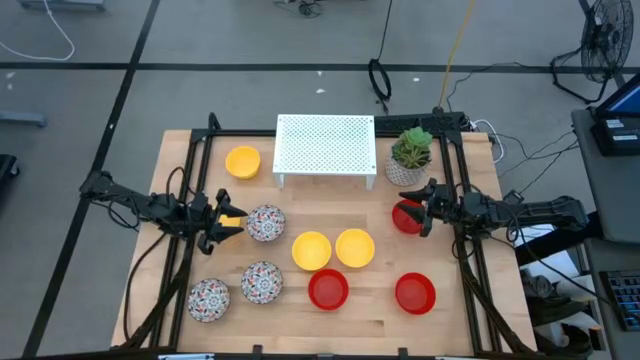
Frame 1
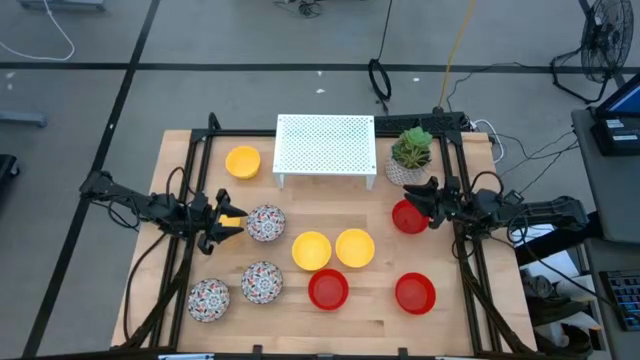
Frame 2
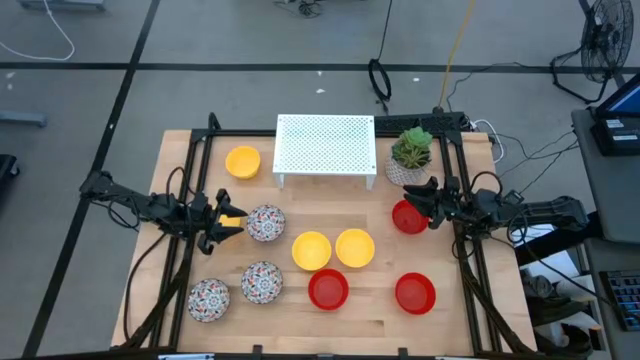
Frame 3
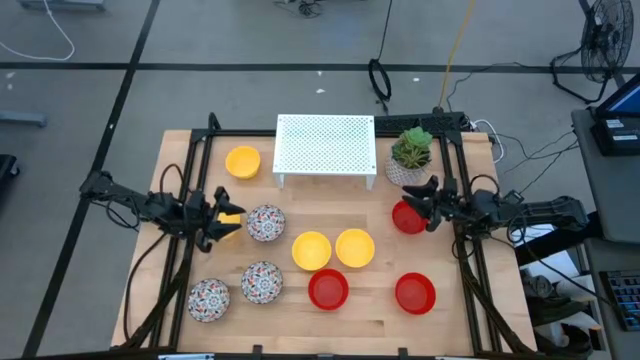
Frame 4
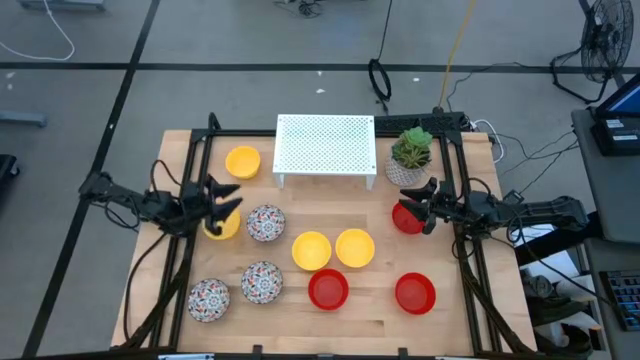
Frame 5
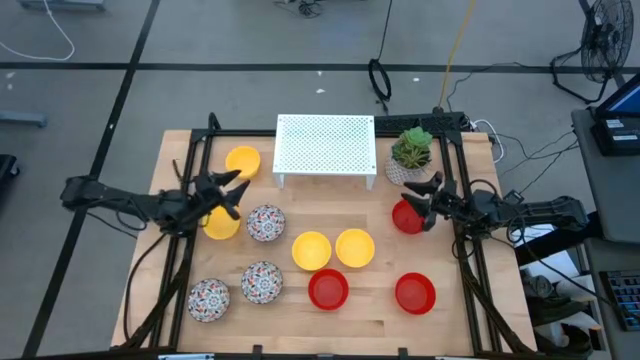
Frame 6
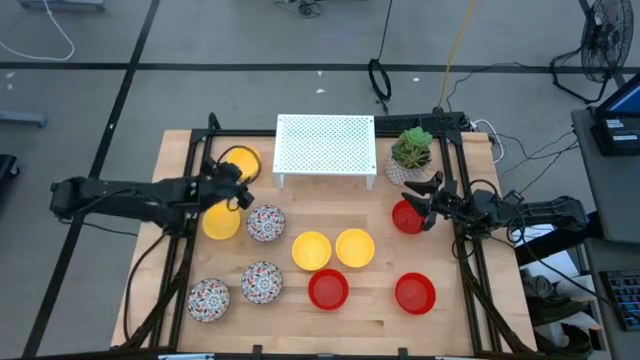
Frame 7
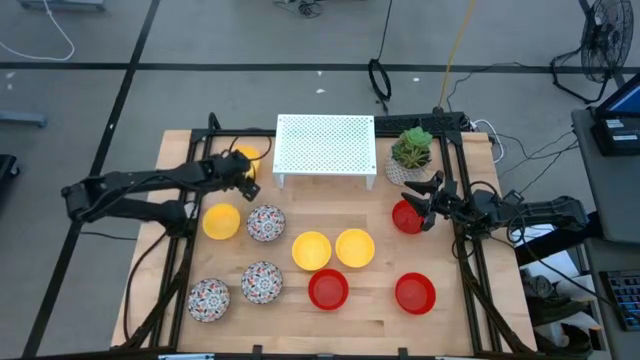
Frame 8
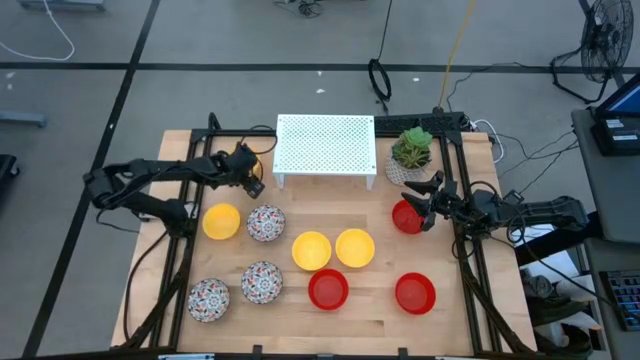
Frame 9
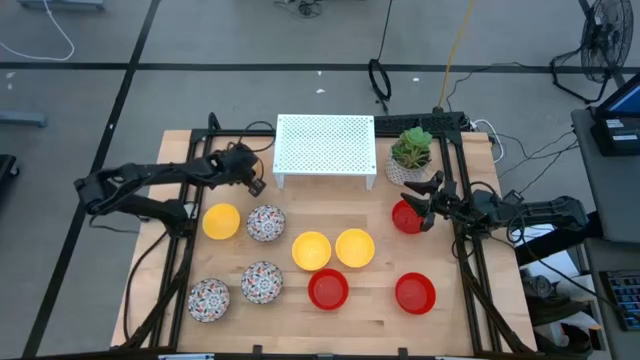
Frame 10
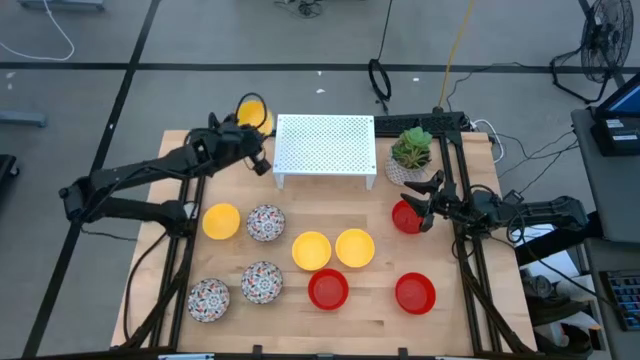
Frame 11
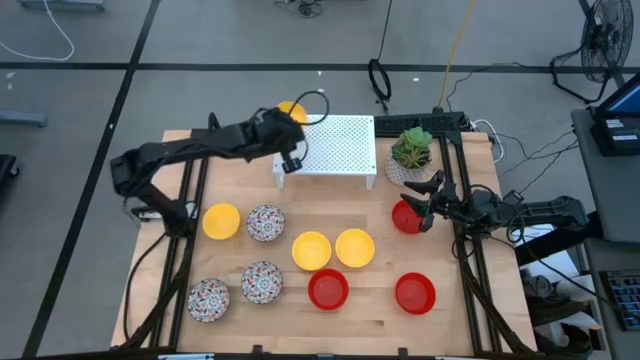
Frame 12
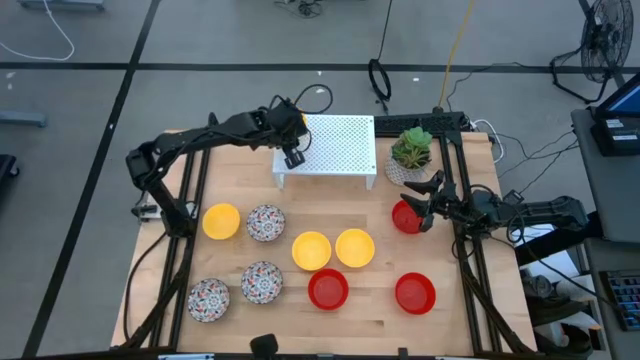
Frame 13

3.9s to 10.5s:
Task: Pick & Place Mini bowls
Put the yellow bowl on the shelf

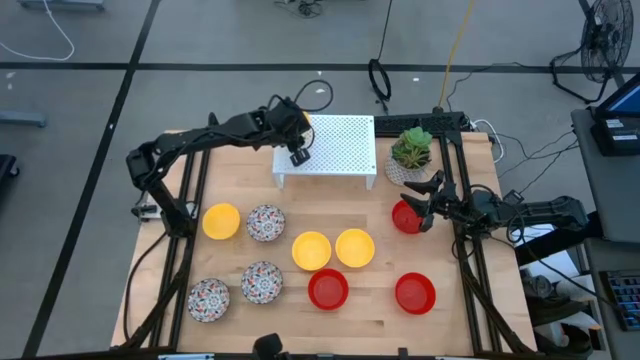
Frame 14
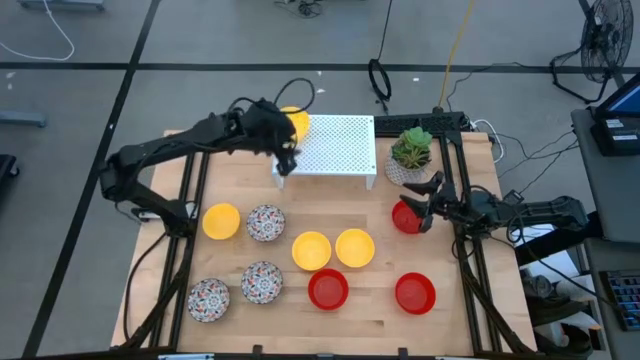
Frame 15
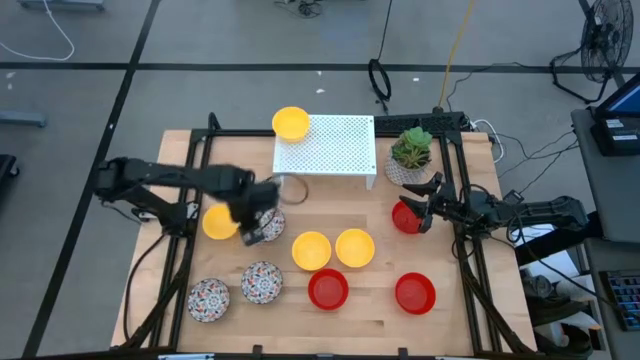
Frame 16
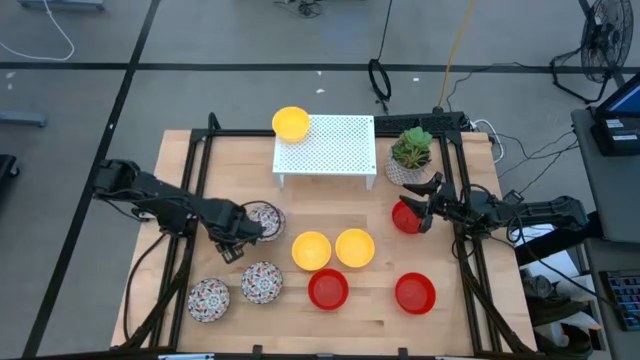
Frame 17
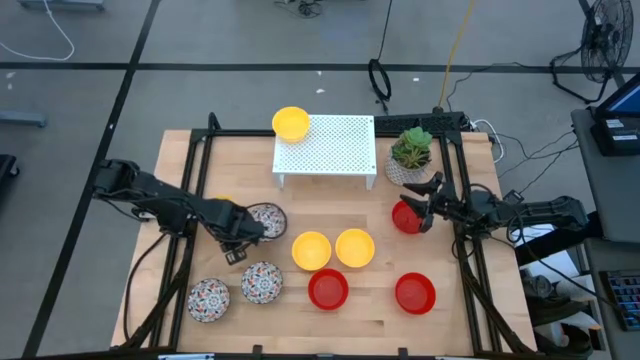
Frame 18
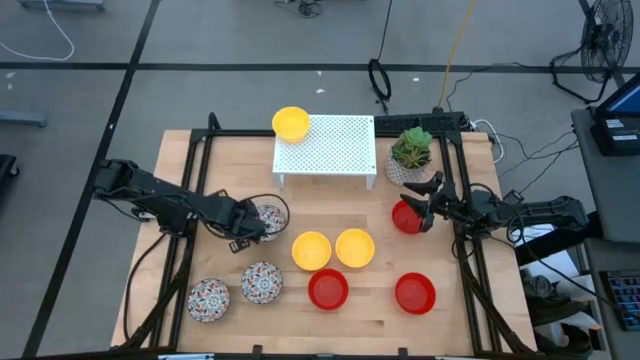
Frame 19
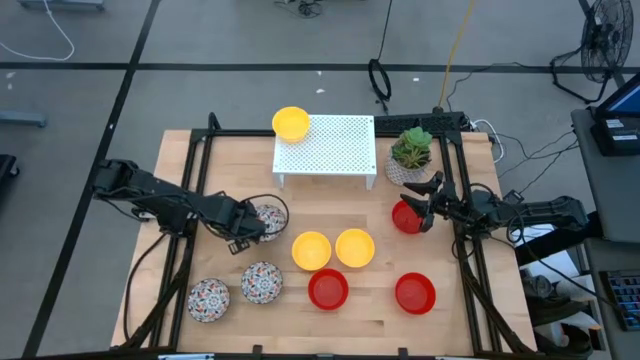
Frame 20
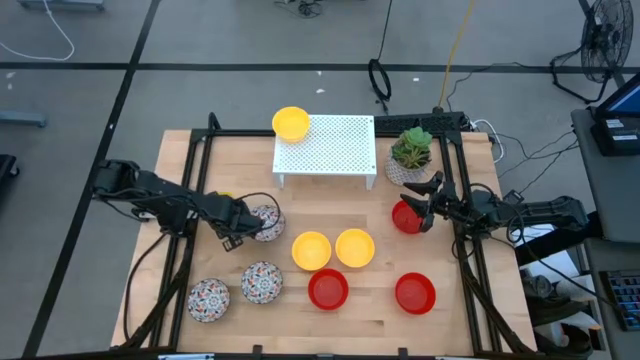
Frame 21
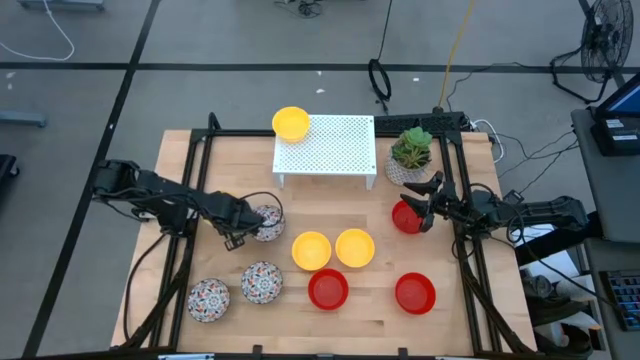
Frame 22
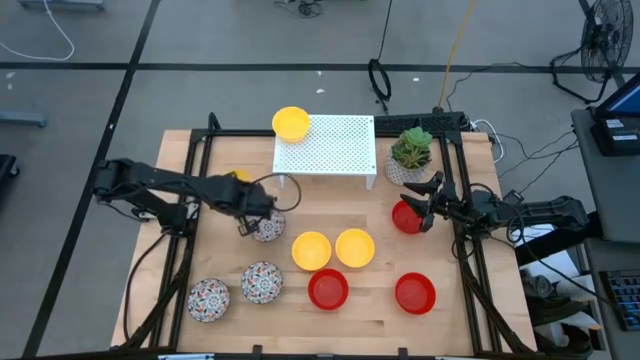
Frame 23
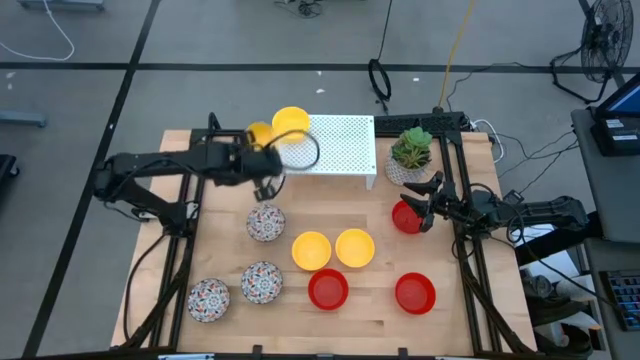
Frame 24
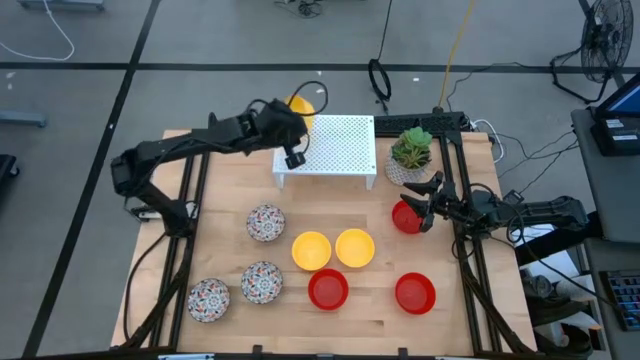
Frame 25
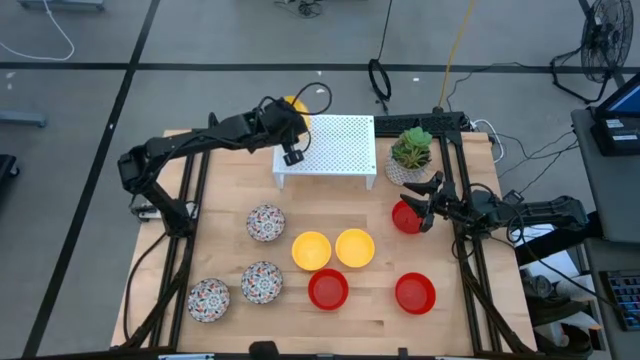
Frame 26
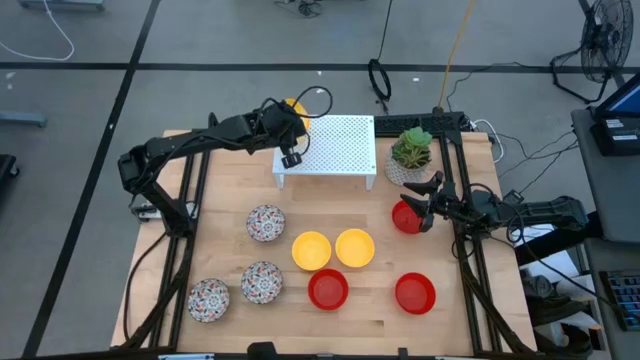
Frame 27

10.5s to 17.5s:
Stack the yellow bowl on the yellow bowl on the shelf

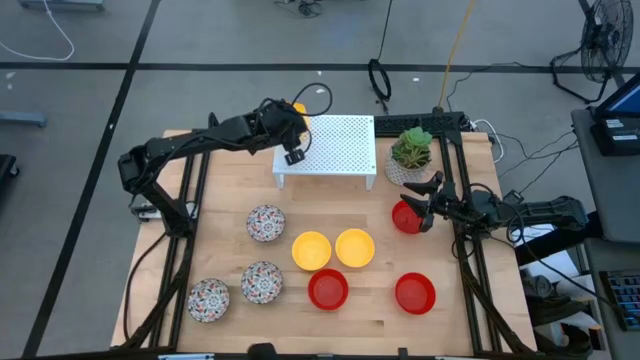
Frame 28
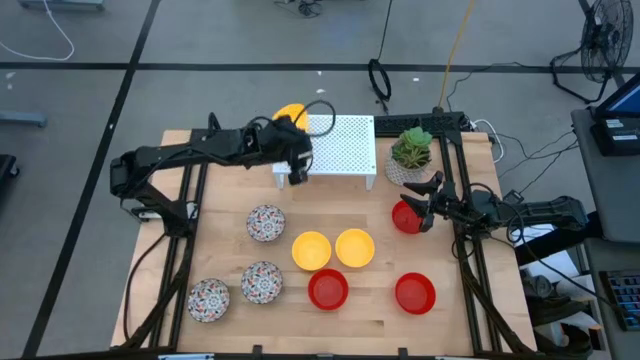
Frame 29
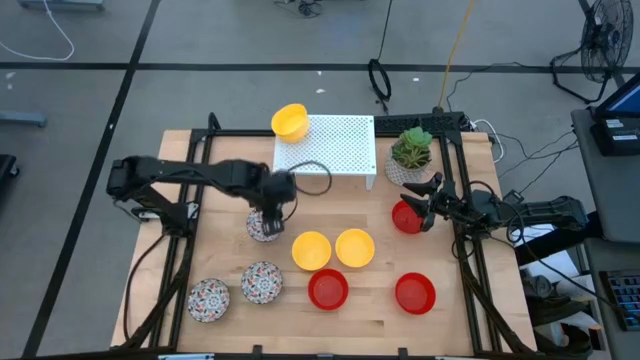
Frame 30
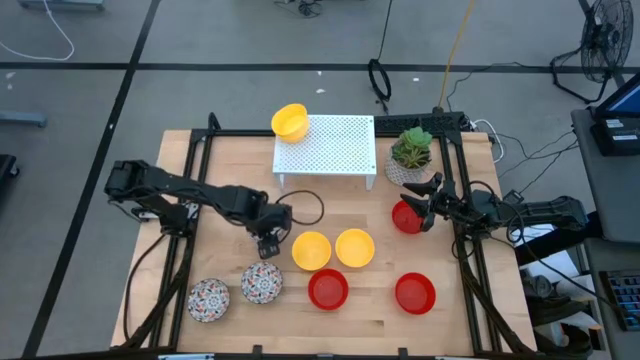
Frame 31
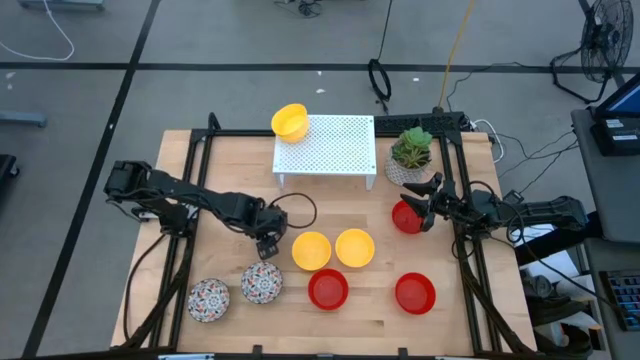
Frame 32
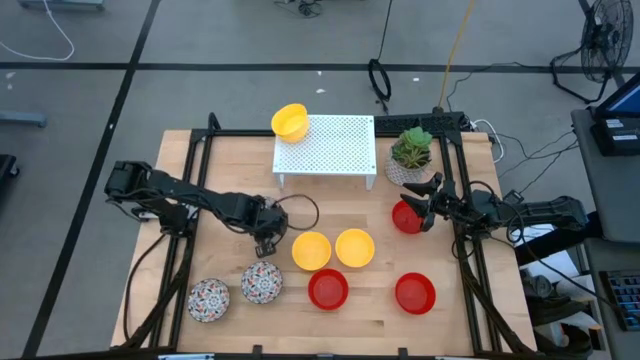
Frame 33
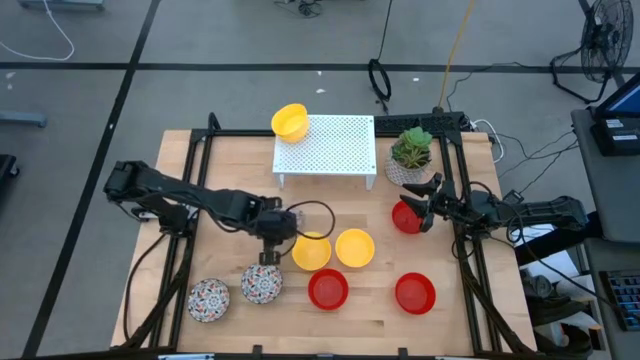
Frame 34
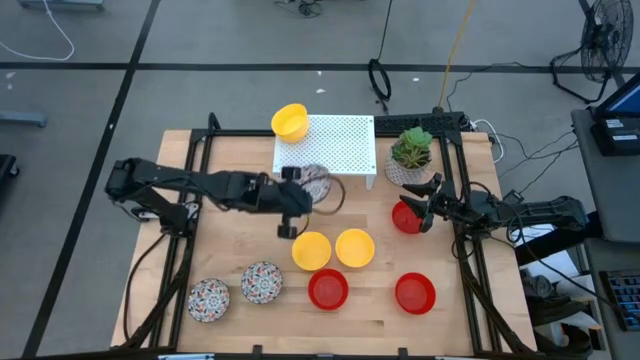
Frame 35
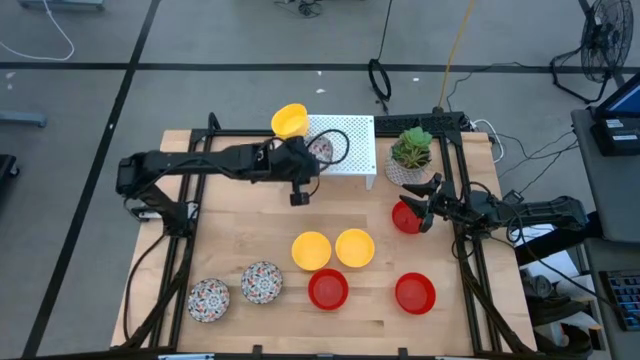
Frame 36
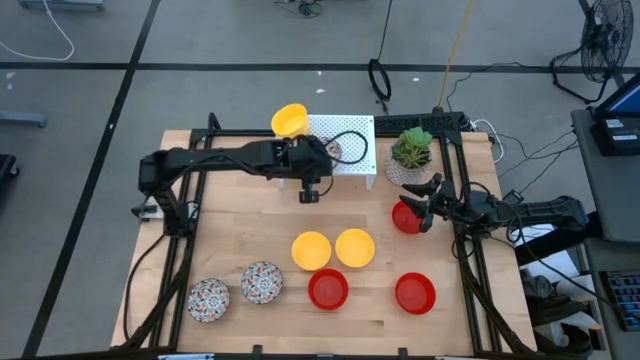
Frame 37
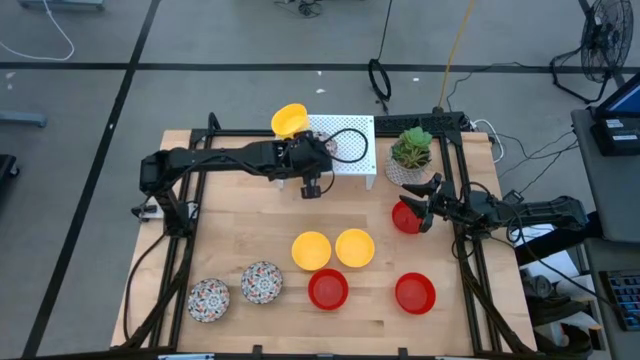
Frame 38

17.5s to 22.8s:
Put the white patterned bowl on the shelf

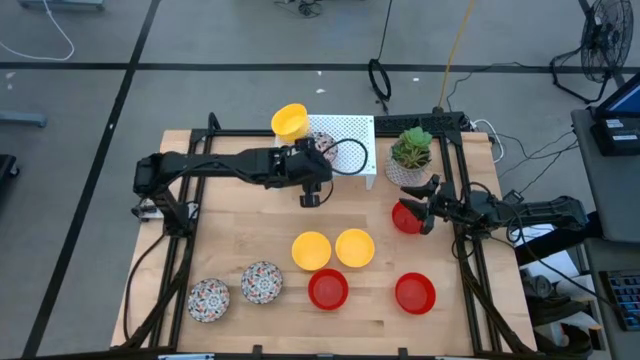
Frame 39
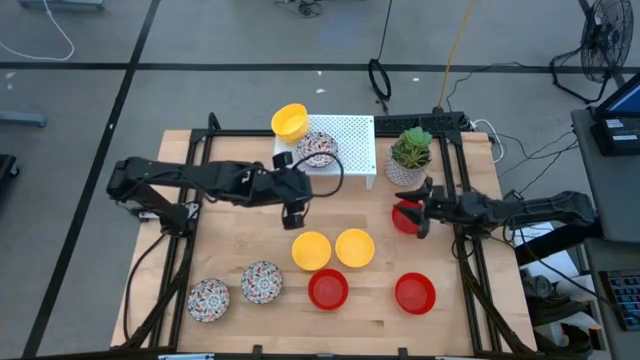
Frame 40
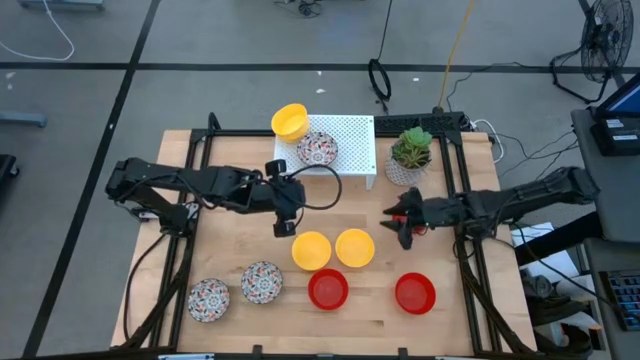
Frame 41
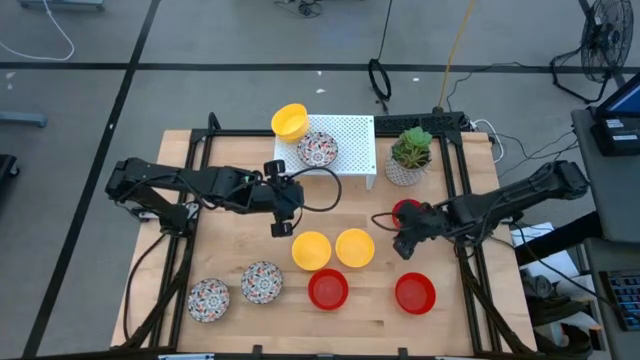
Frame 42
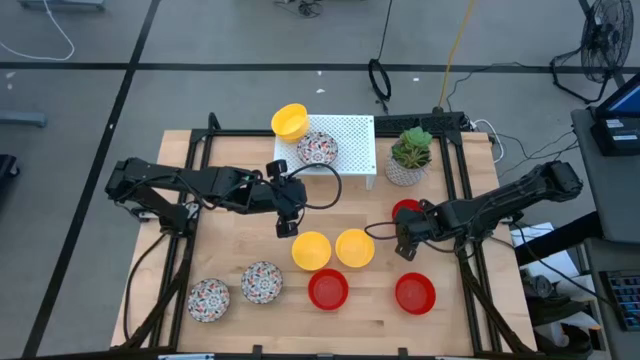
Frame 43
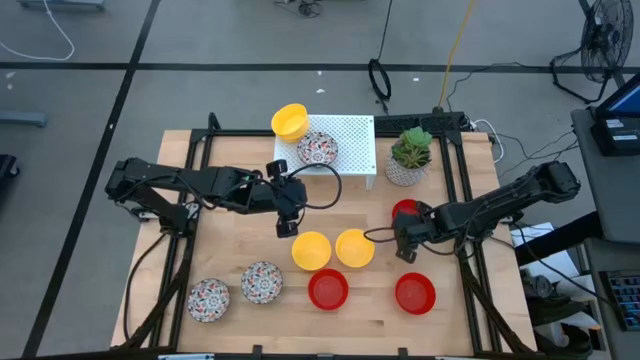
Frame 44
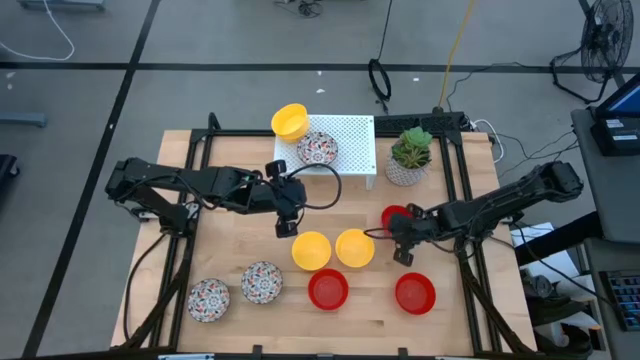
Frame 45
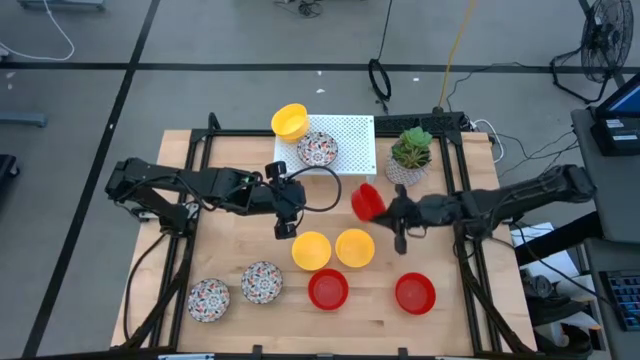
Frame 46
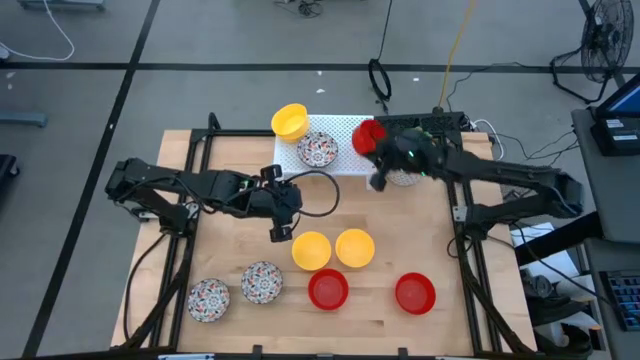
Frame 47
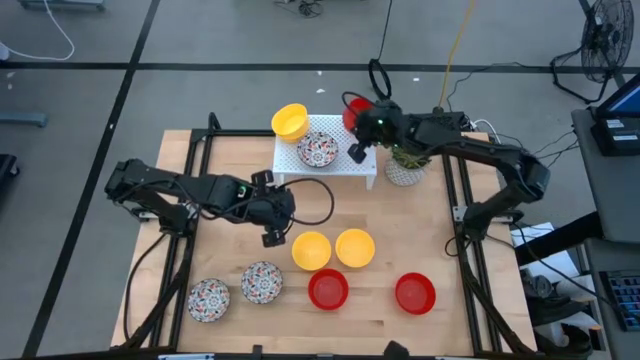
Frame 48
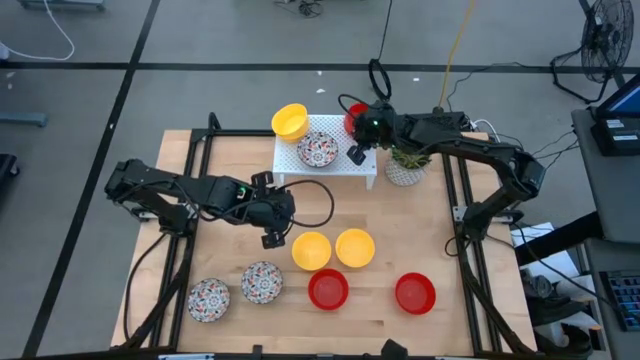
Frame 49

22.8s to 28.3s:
Put the red bowl on the shelf
